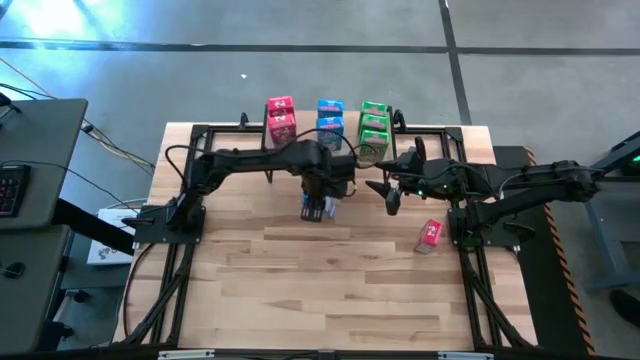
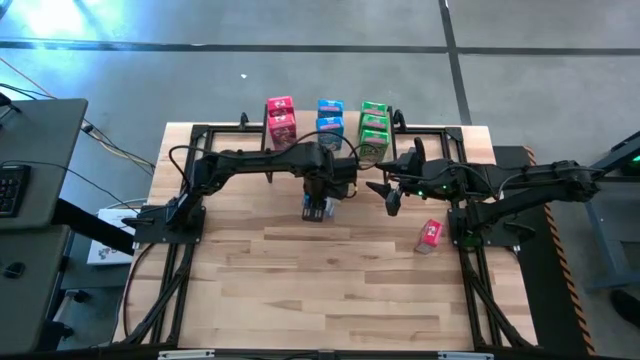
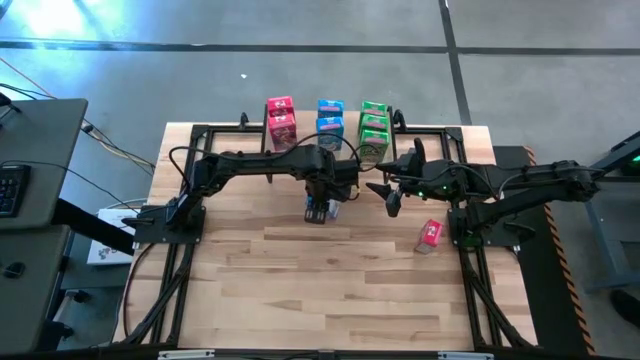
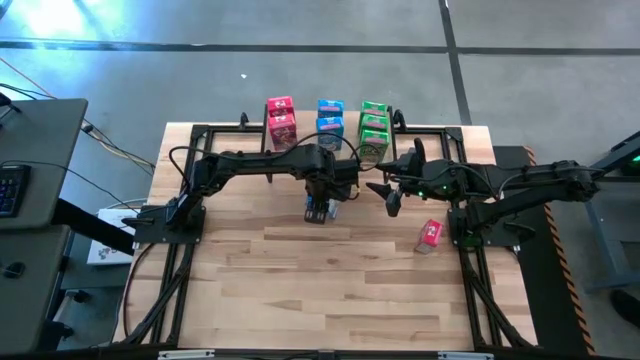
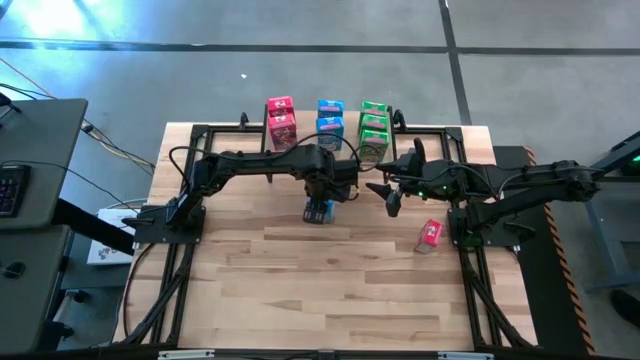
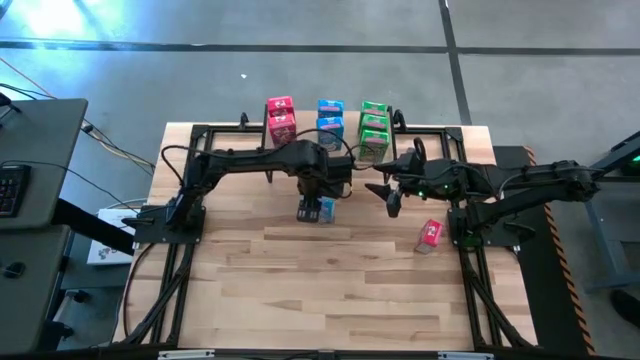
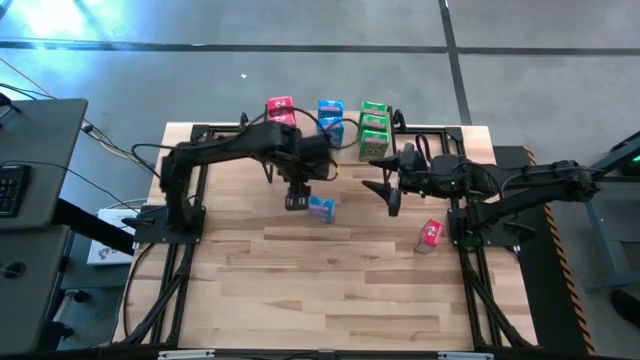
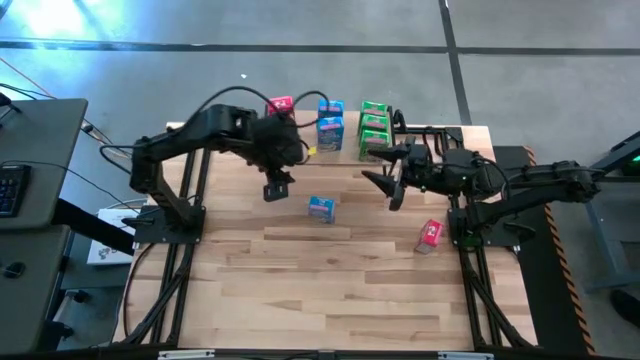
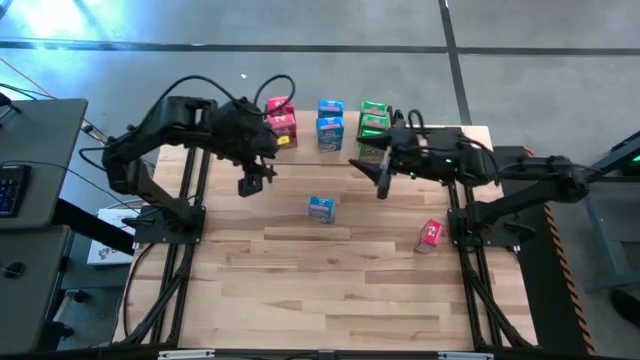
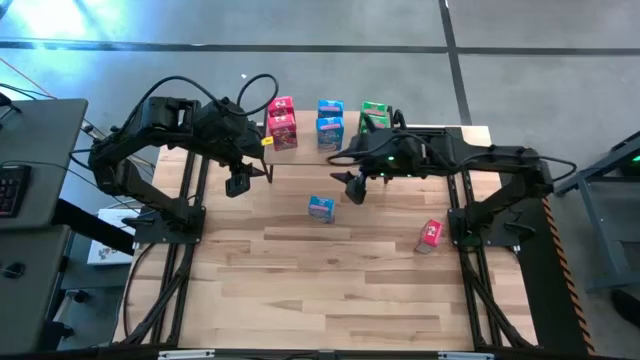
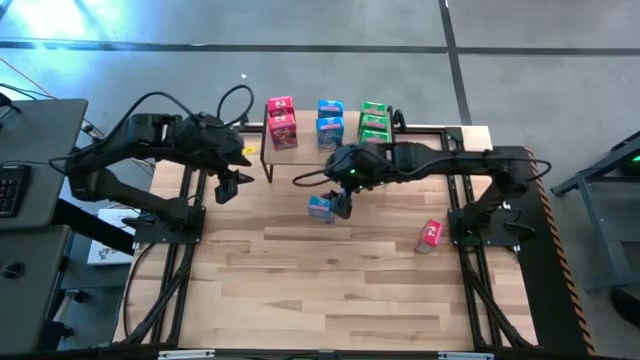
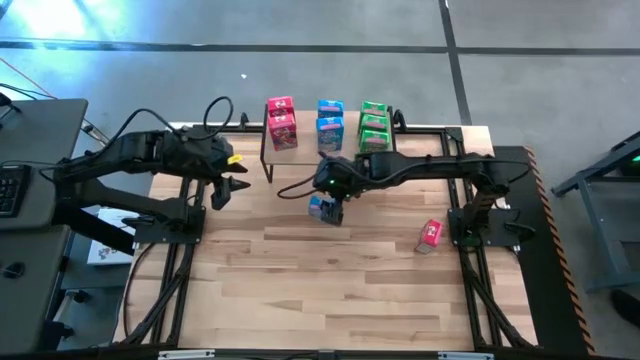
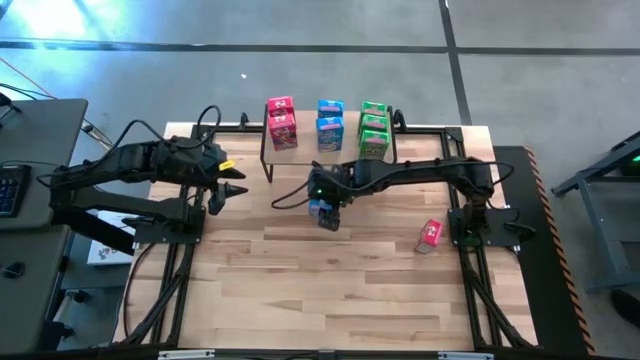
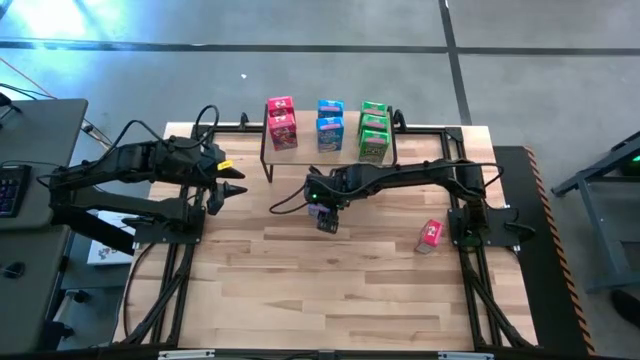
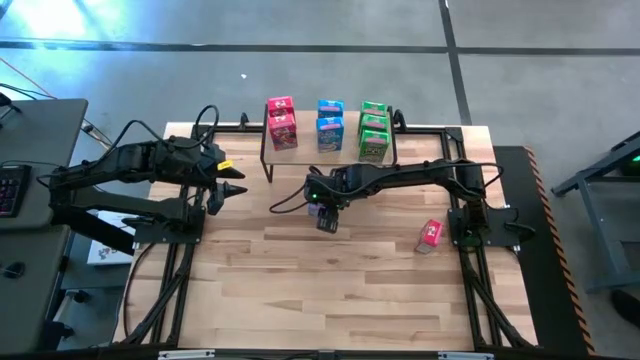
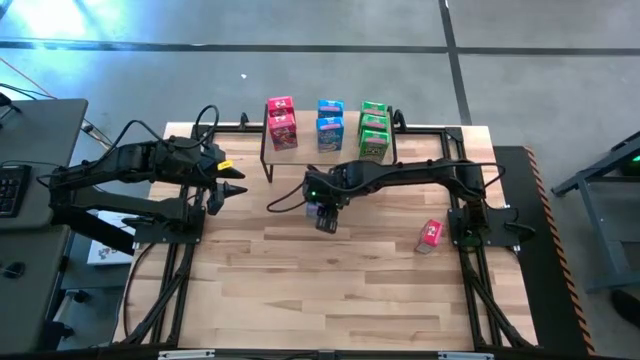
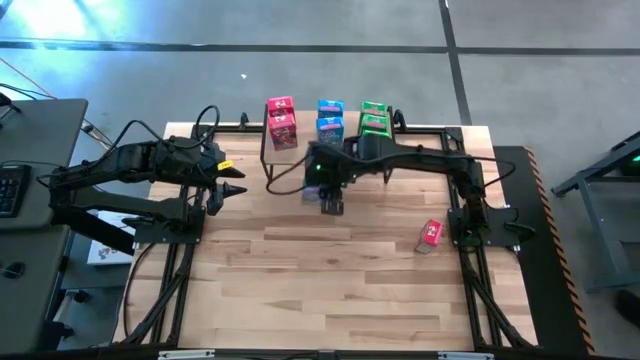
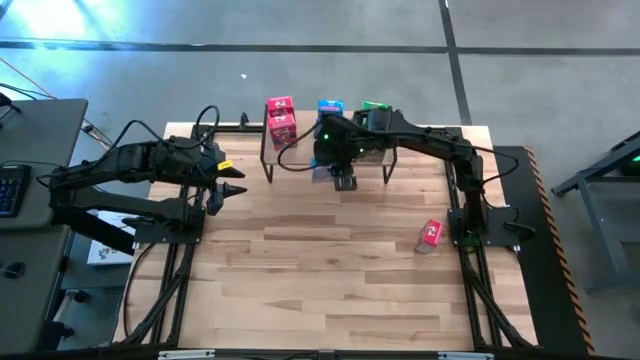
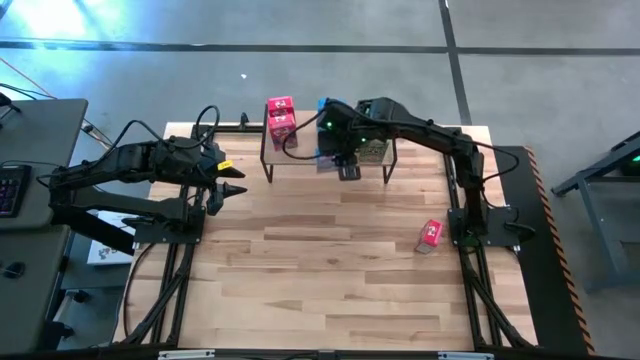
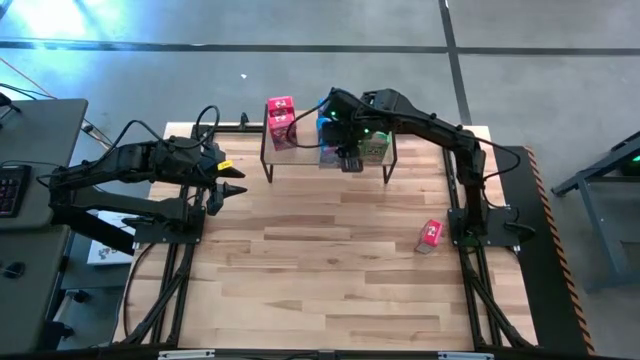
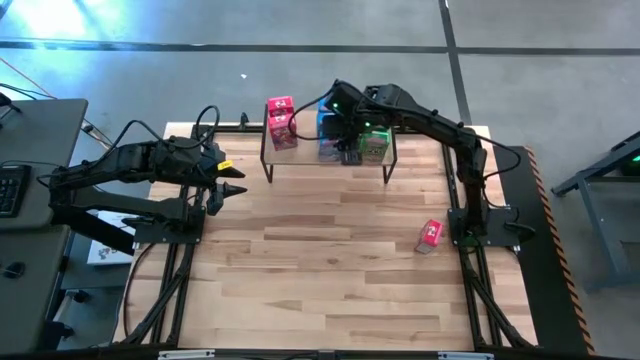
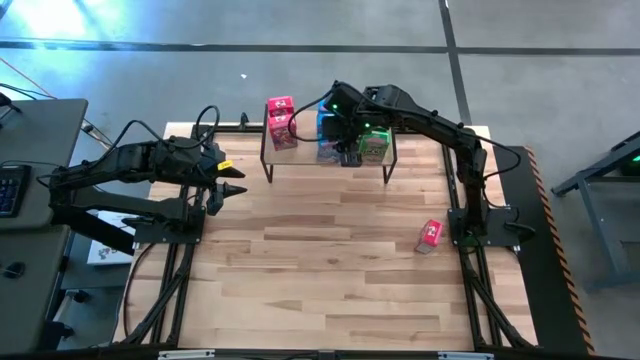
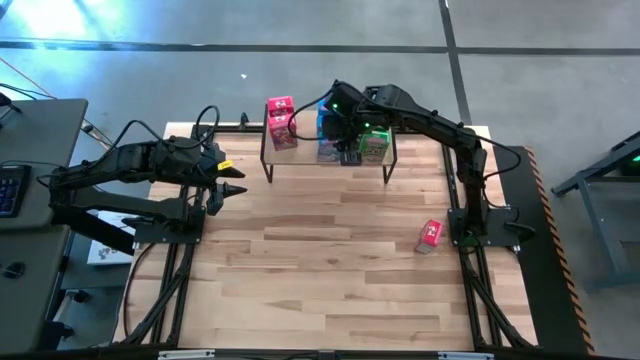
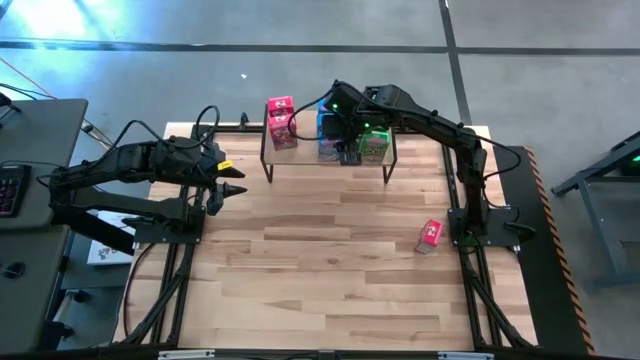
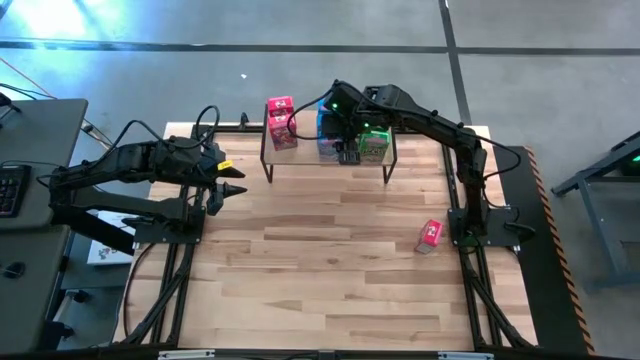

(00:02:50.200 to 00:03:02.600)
Task: Stack cereal on shelf
Put the blue cereal box on the center of the table aligned with the other blue cereal boxes

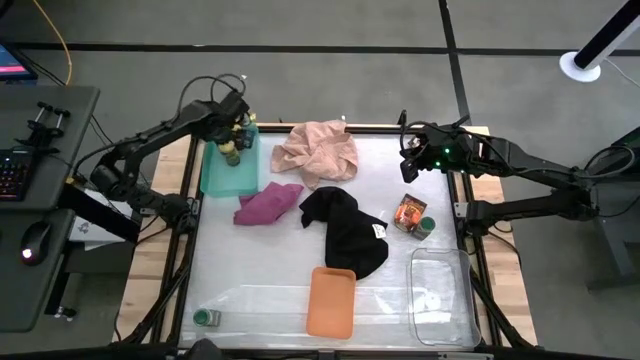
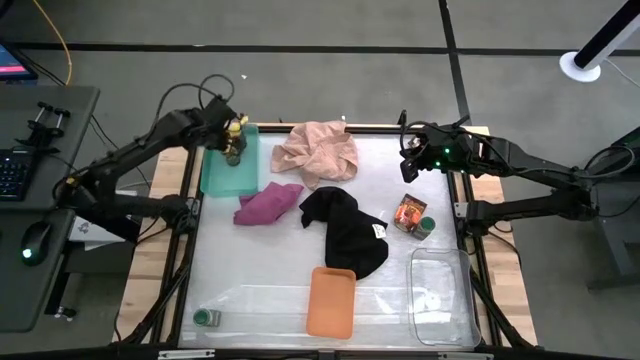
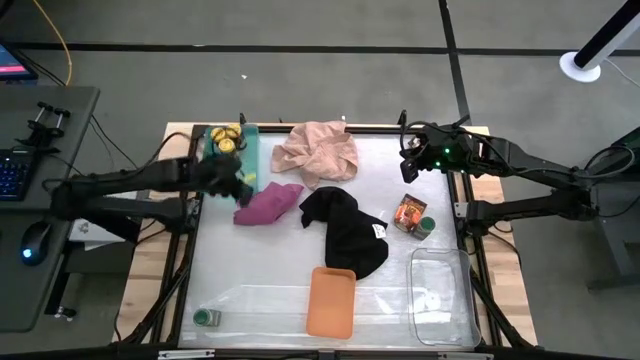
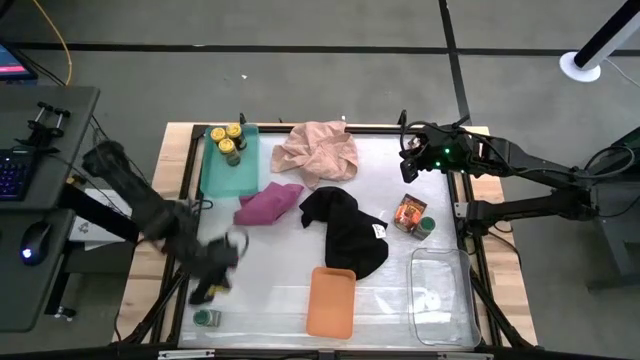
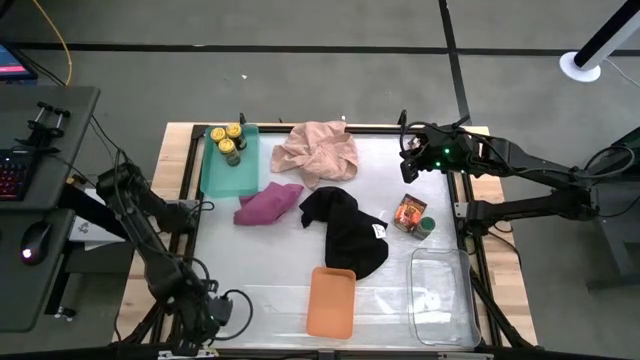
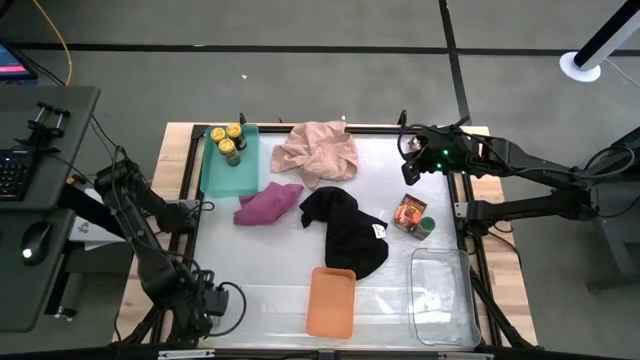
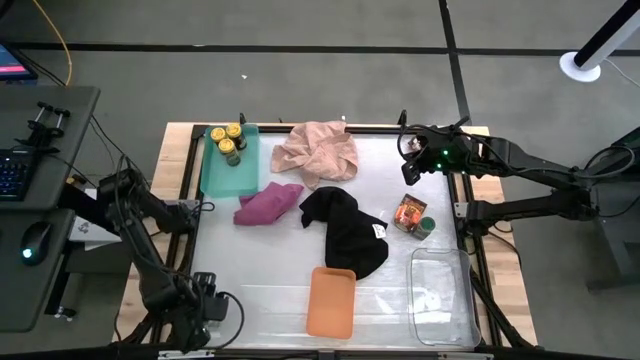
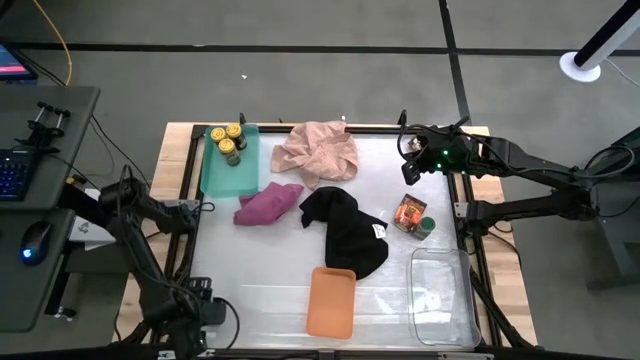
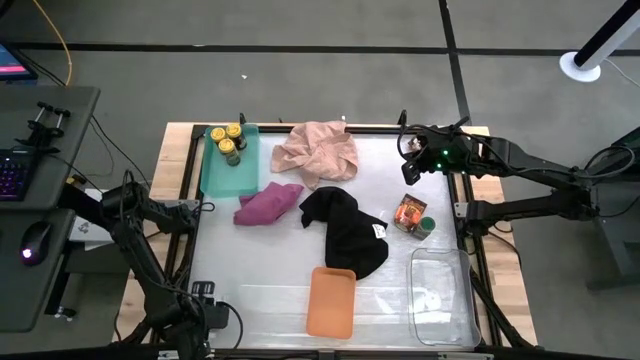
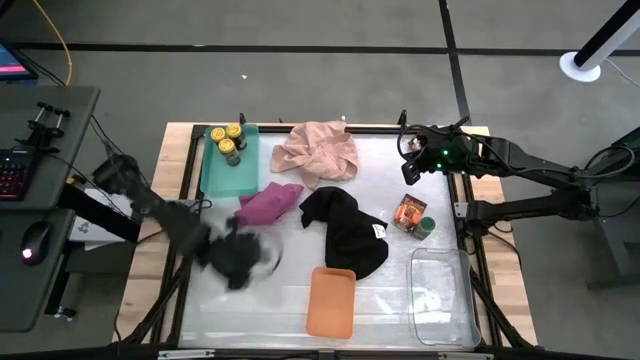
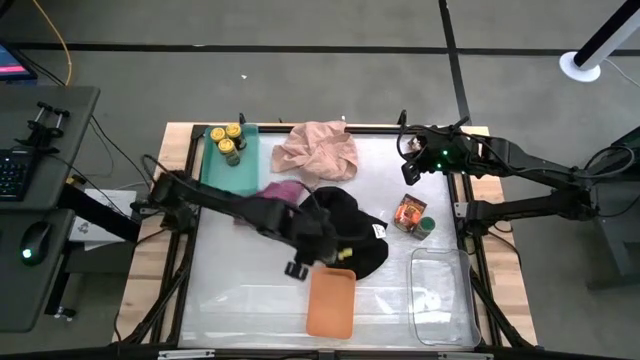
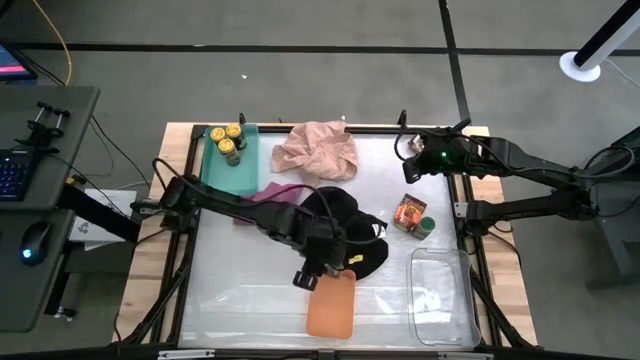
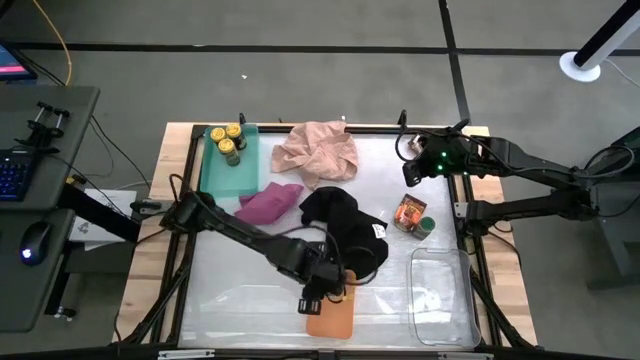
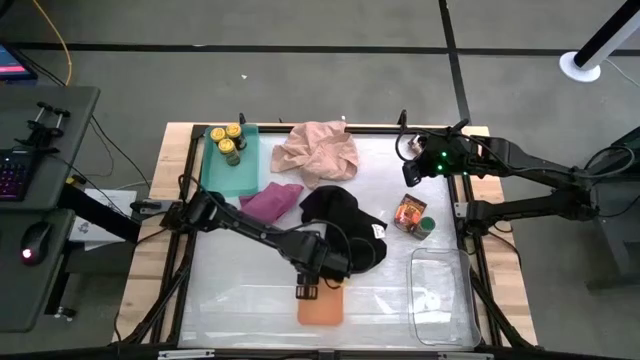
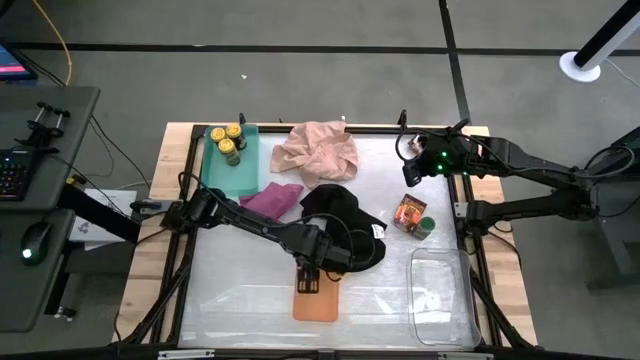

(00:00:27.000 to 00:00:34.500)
Task: Sort spices by type
Put the left green seasoning bottle into the orange bin
